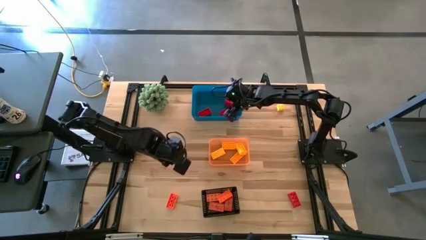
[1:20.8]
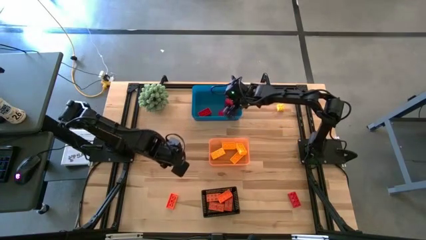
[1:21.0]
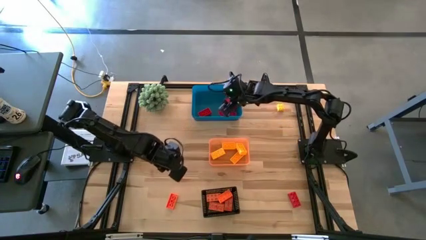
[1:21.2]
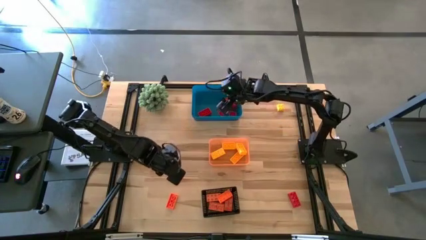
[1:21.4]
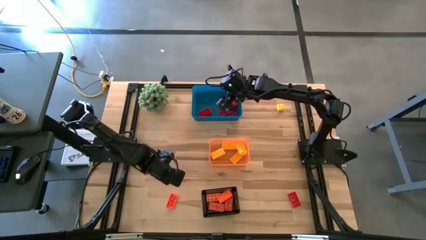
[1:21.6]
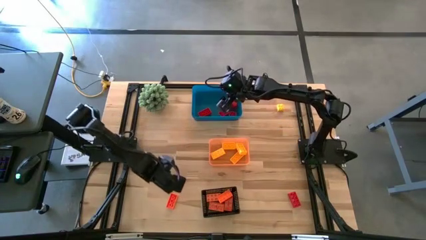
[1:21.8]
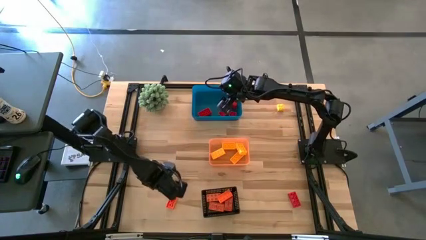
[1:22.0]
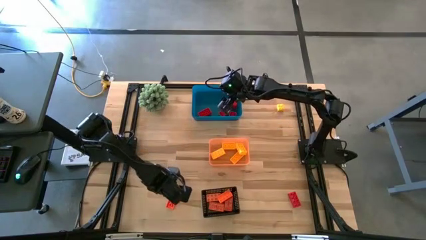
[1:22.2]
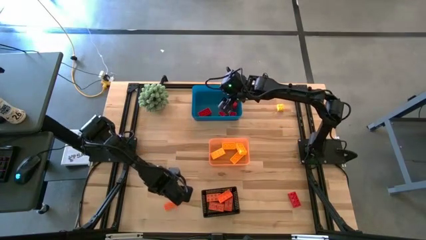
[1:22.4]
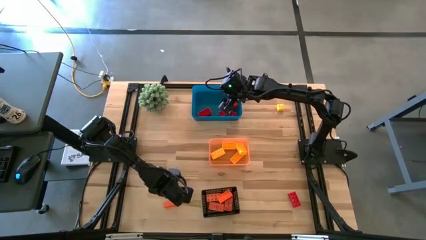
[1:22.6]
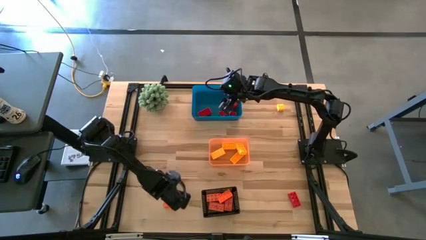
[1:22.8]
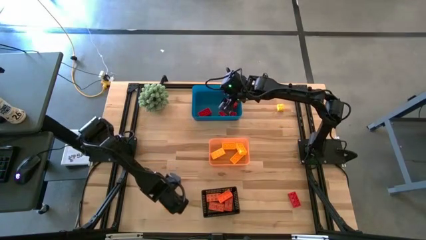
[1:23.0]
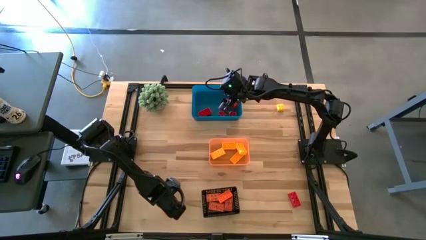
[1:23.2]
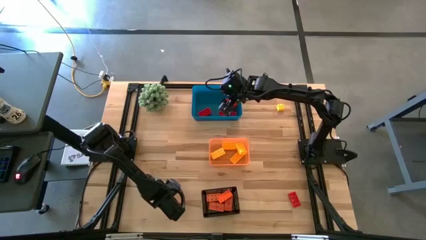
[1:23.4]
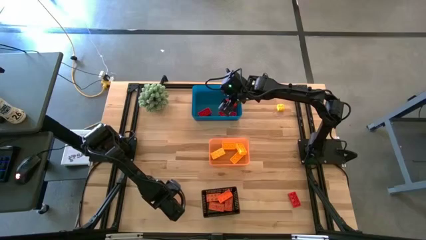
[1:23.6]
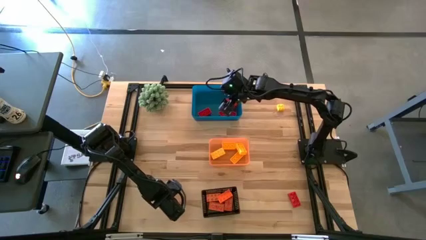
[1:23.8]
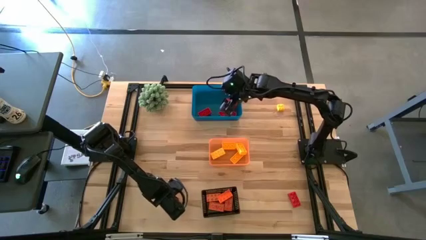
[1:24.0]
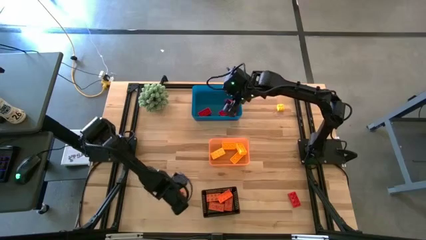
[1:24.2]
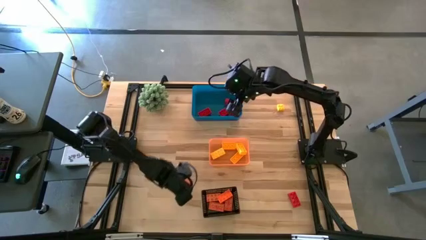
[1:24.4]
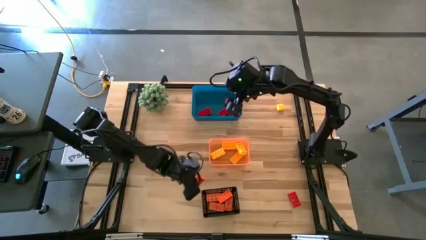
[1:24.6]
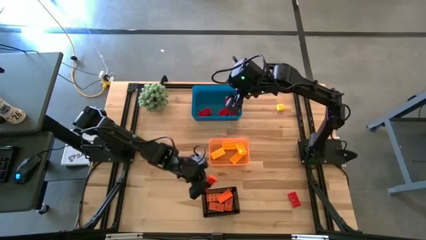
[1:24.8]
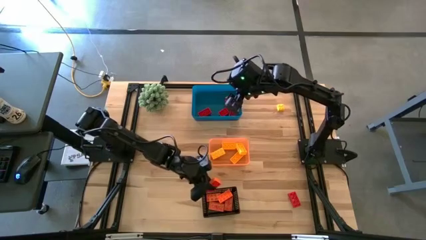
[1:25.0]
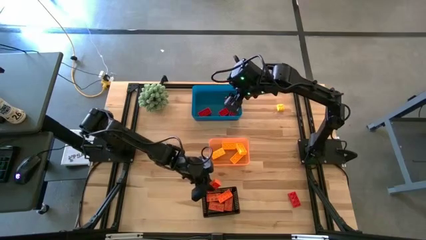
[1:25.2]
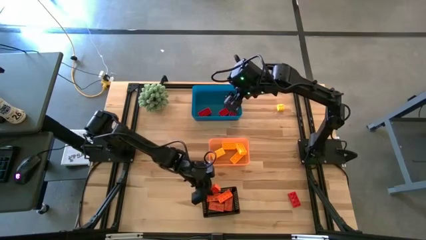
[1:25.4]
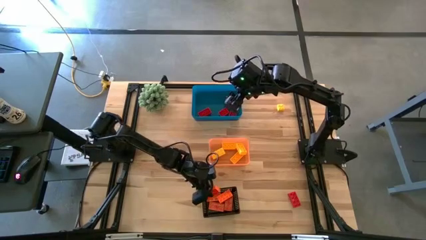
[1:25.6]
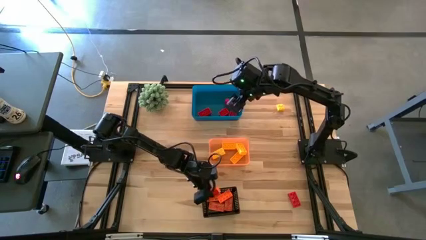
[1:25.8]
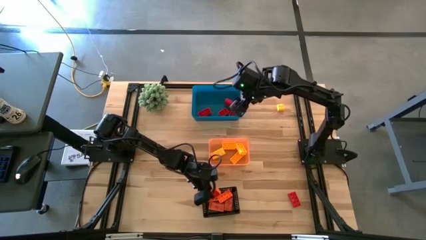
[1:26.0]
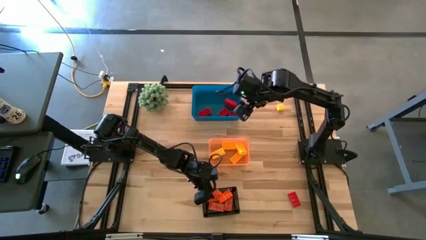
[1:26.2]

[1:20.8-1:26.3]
Task: Sort & place blocks by color
Put the orange game piece into the black bin

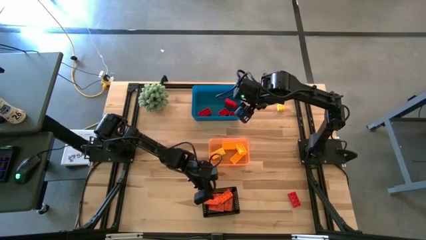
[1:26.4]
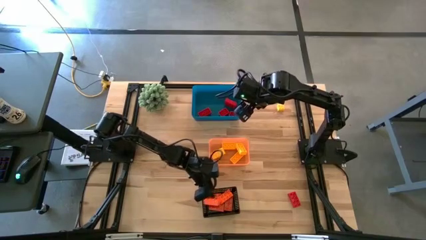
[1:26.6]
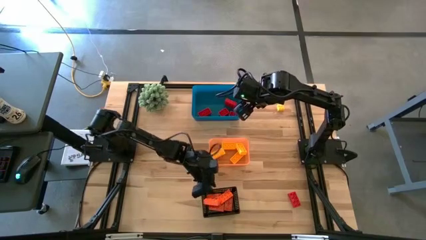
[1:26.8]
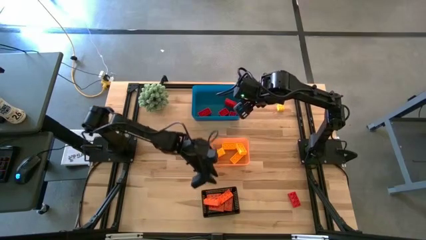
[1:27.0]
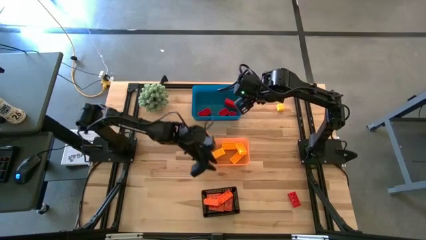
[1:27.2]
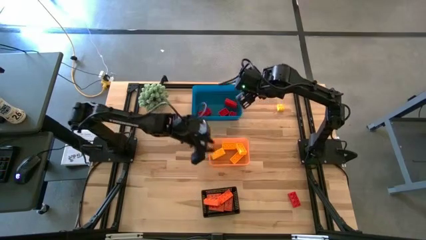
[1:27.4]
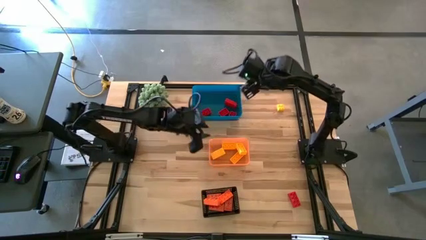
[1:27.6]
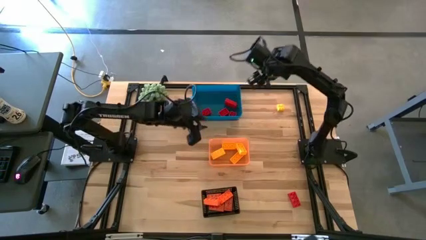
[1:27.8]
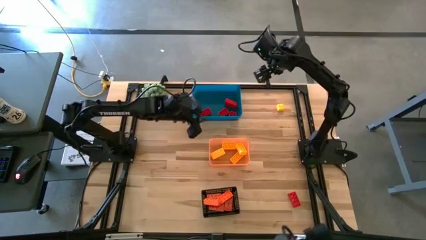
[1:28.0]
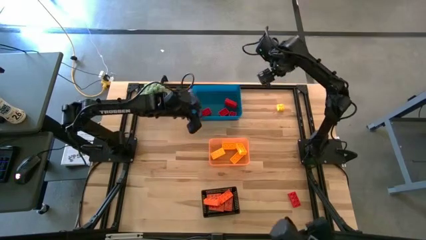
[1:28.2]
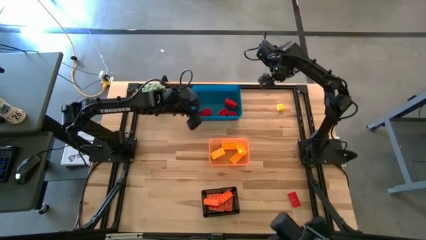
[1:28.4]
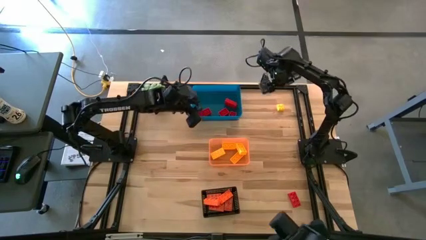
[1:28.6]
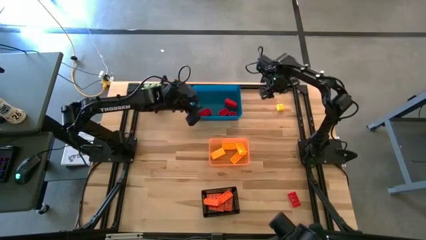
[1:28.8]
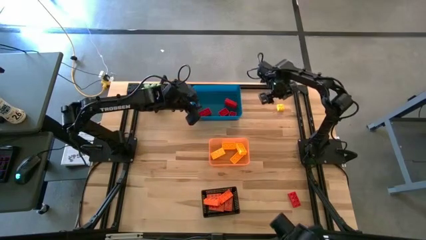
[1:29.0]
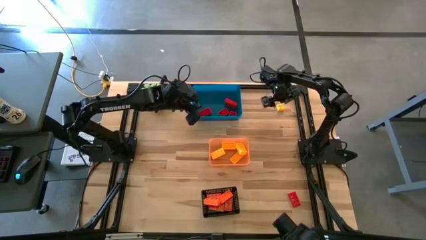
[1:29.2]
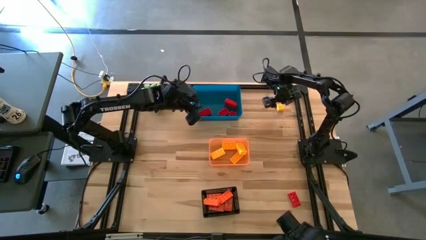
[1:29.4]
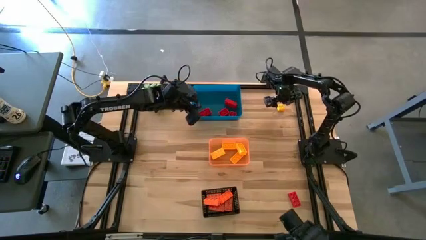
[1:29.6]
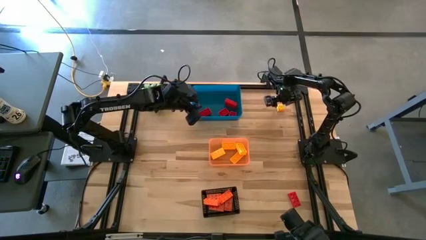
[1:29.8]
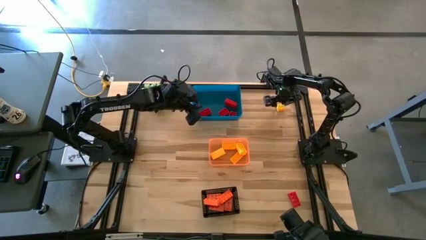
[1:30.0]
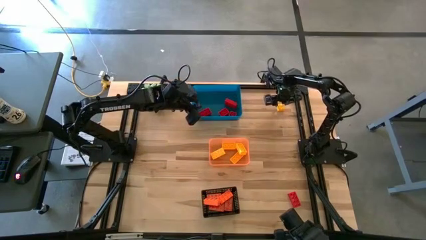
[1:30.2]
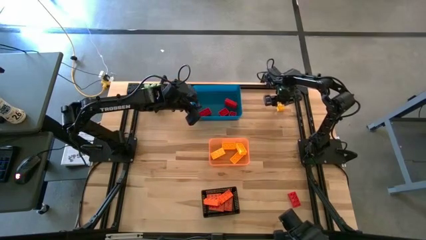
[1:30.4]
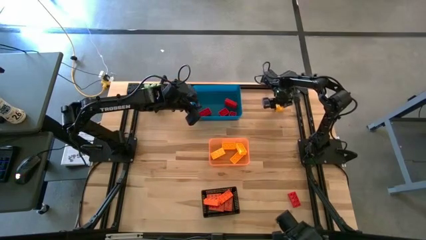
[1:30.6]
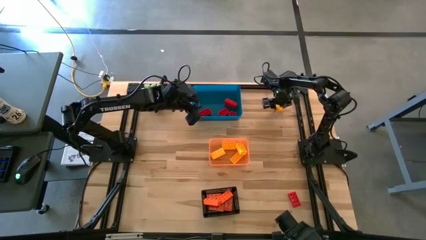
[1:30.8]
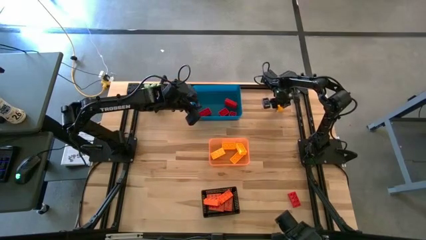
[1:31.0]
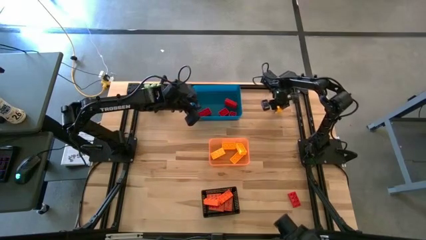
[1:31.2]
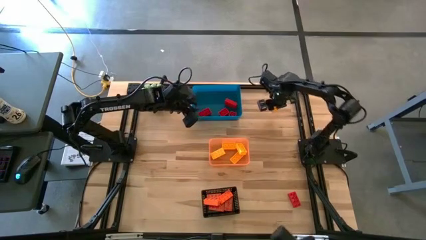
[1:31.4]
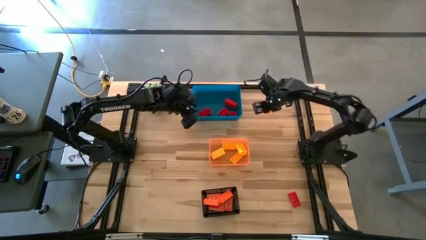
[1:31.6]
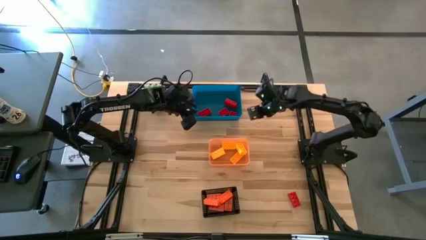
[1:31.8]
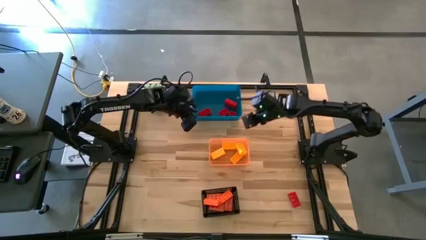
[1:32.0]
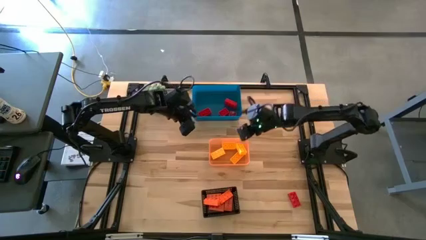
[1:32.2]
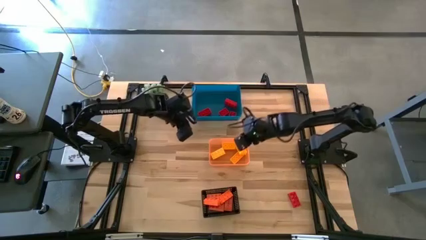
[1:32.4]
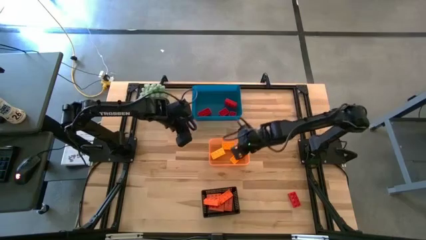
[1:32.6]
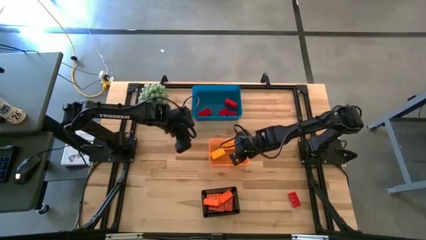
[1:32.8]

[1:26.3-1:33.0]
Put the yellow game piece into the orange bin

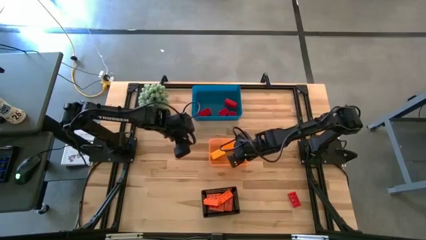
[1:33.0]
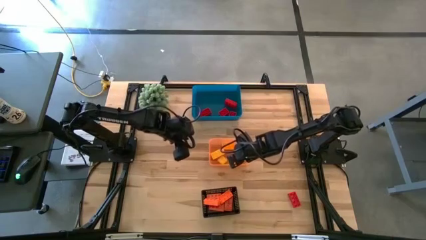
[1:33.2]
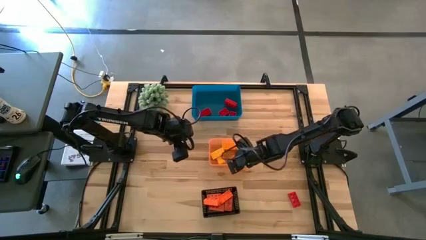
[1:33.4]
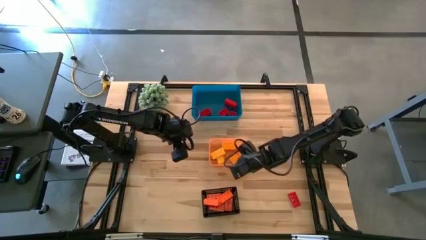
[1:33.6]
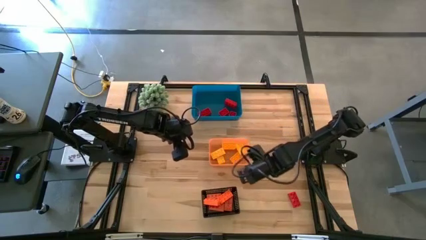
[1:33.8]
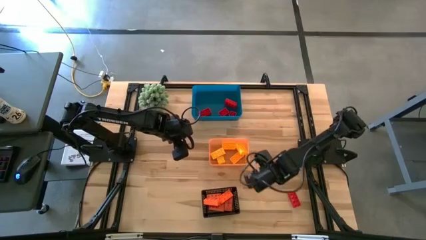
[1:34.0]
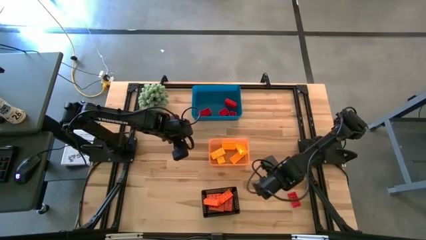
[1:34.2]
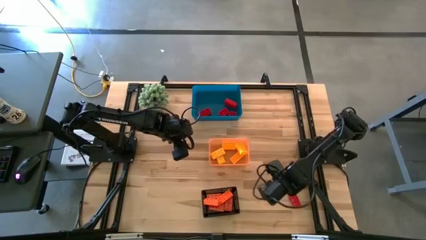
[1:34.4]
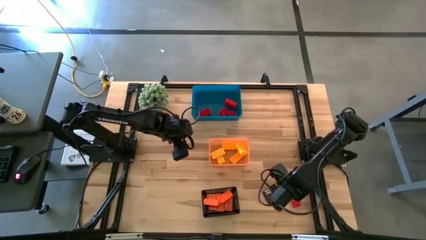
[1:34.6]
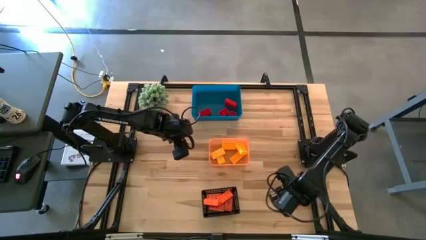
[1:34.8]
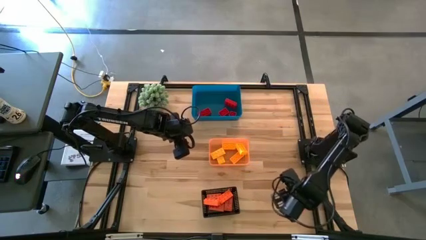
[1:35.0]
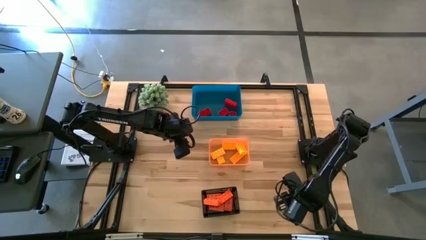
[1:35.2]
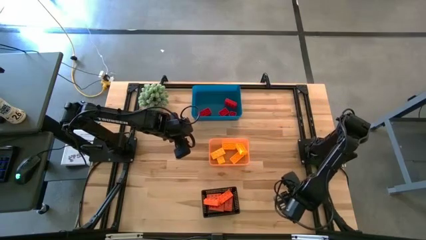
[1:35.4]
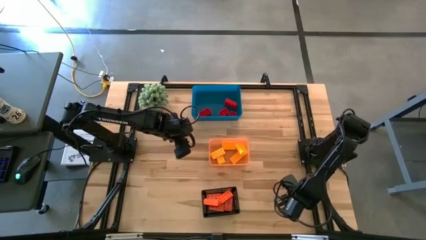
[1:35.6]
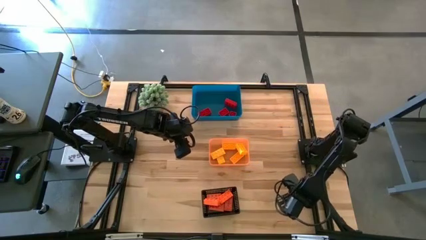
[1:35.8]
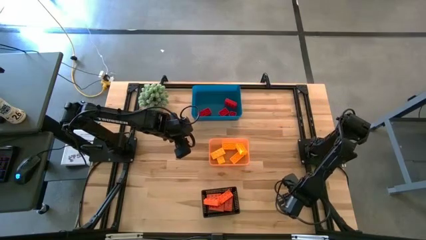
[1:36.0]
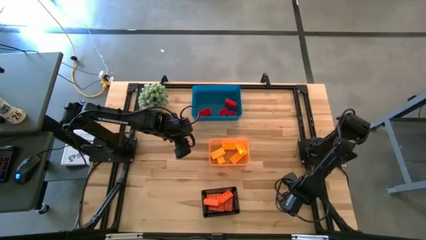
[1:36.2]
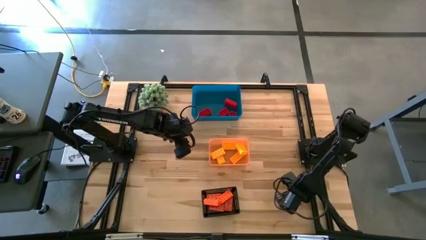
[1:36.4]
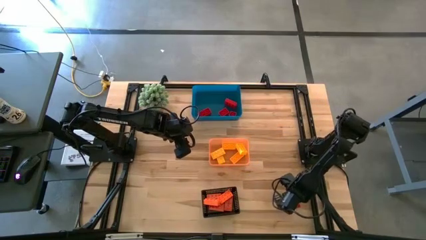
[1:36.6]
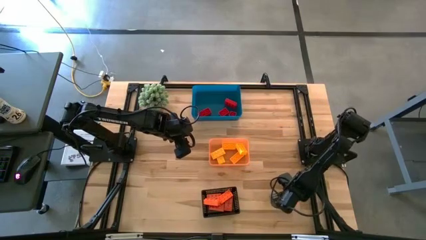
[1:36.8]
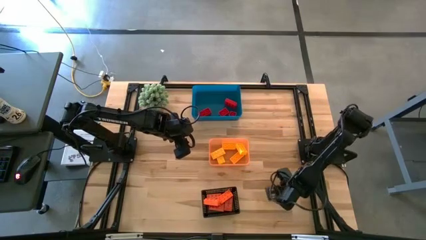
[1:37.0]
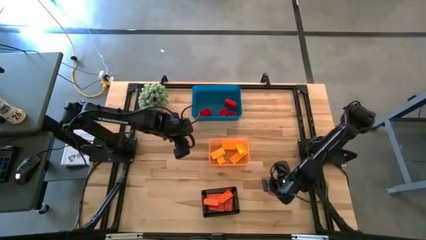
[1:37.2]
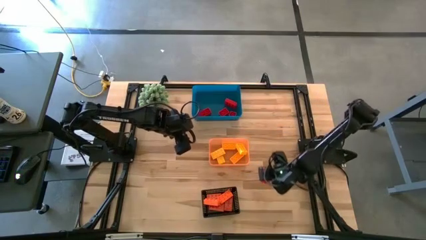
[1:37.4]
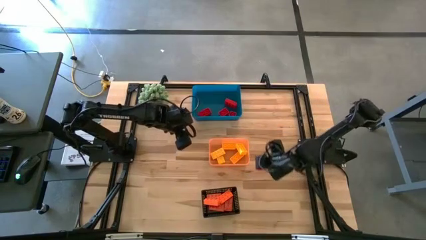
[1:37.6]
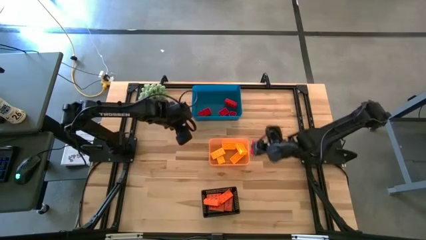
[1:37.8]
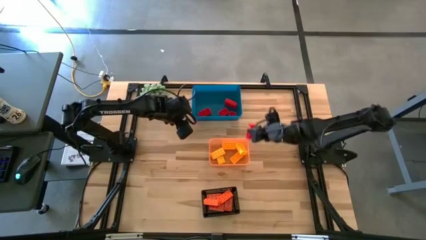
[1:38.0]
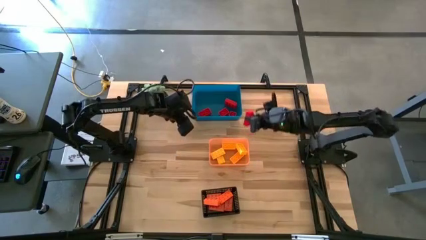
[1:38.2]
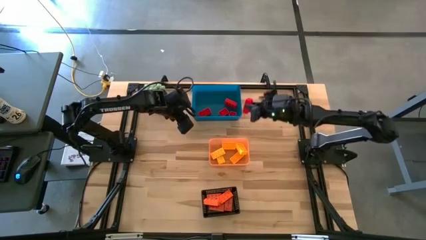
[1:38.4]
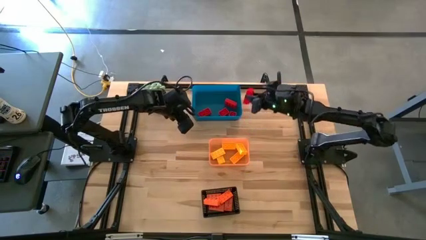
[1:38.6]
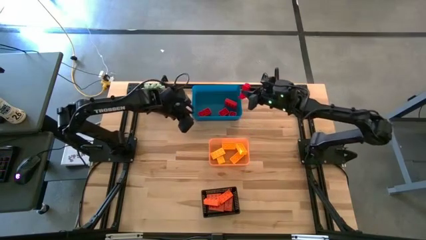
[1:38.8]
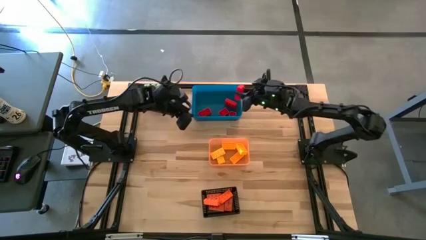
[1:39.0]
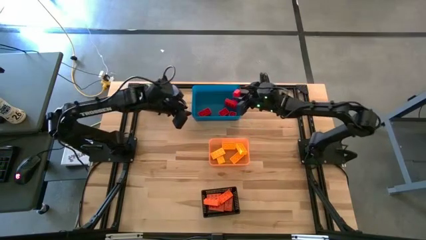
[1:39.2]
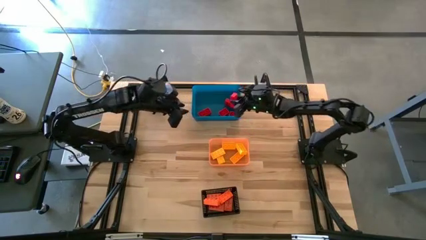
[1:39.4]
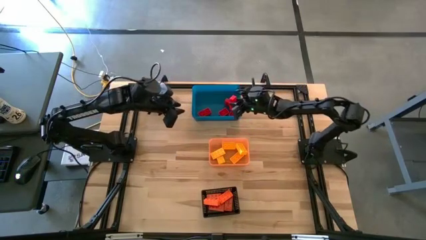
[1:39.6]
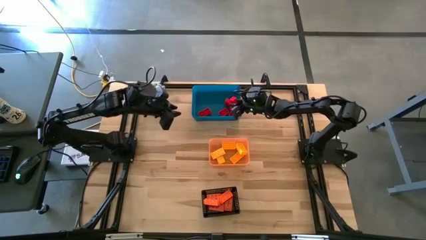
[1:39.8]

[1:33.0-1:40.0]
Put the red game piece into the blue bin
